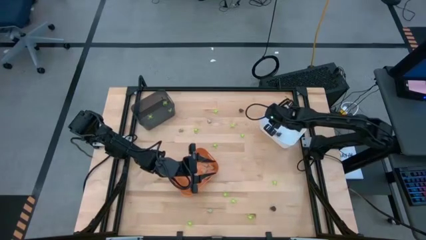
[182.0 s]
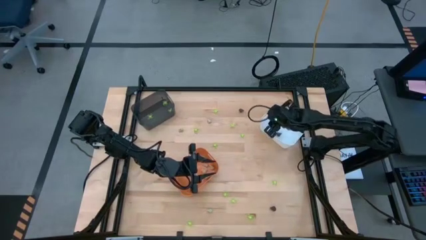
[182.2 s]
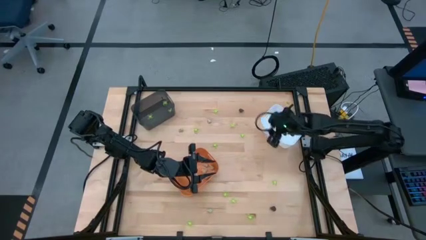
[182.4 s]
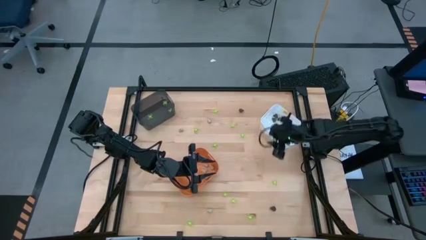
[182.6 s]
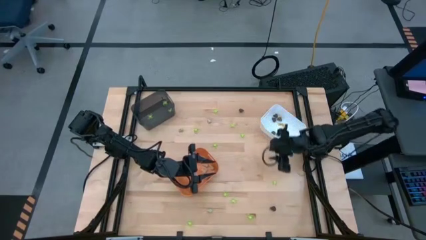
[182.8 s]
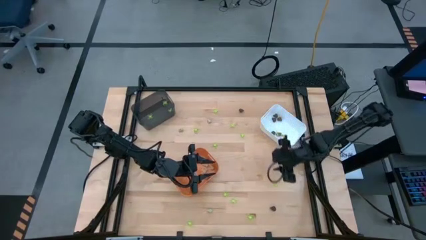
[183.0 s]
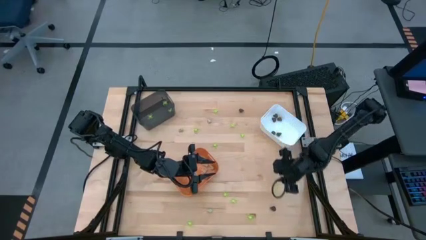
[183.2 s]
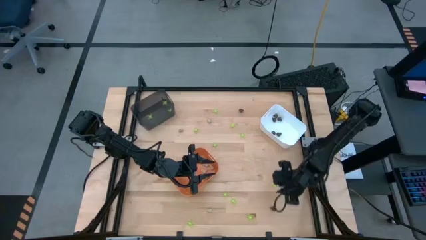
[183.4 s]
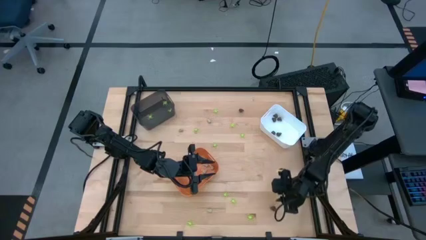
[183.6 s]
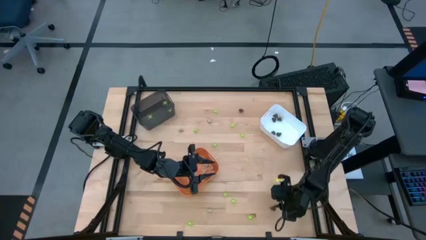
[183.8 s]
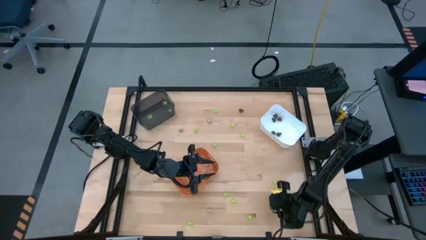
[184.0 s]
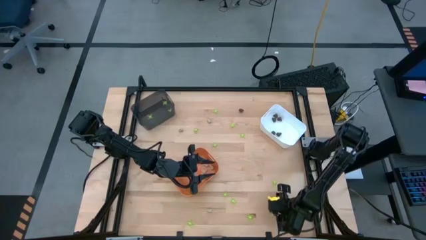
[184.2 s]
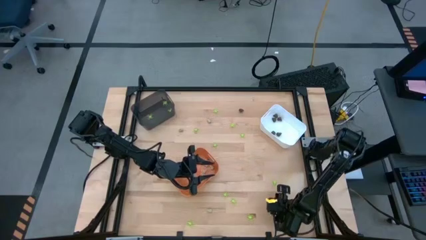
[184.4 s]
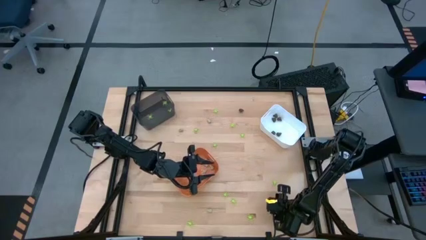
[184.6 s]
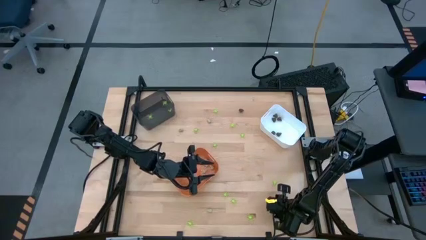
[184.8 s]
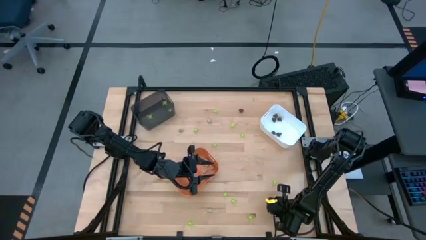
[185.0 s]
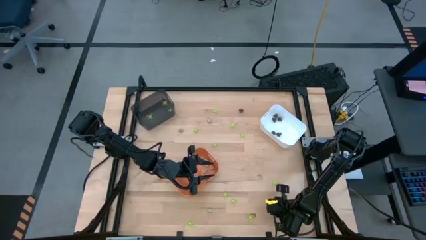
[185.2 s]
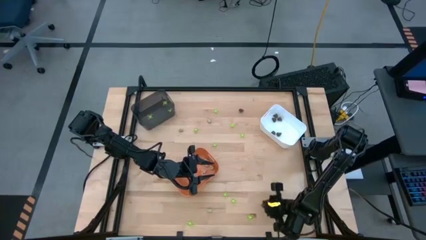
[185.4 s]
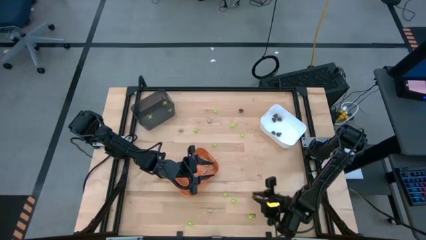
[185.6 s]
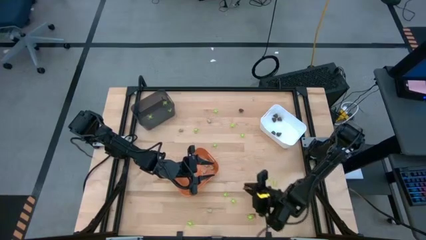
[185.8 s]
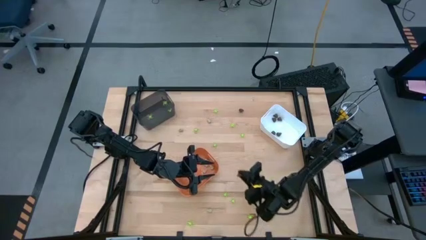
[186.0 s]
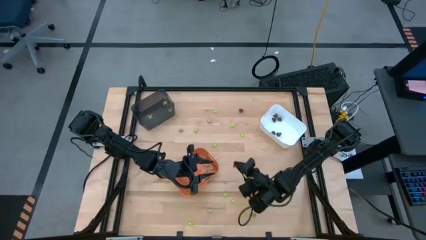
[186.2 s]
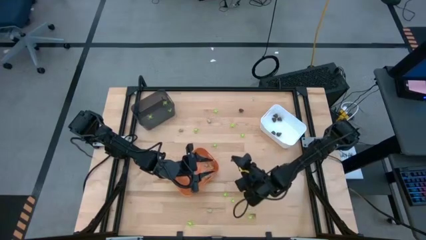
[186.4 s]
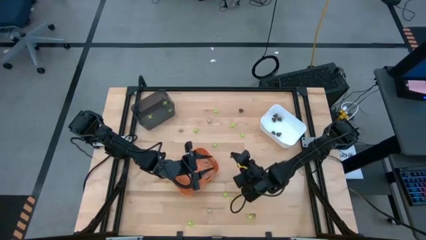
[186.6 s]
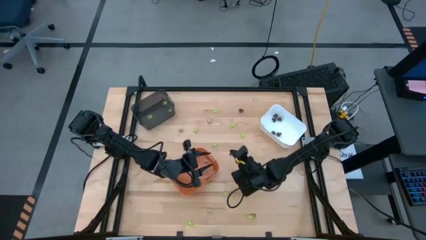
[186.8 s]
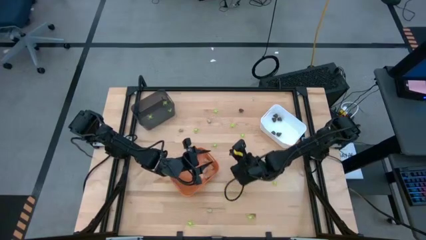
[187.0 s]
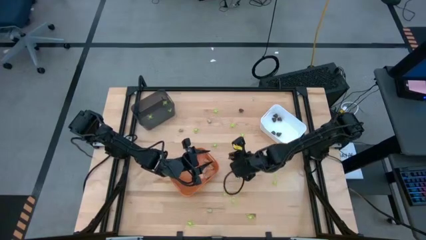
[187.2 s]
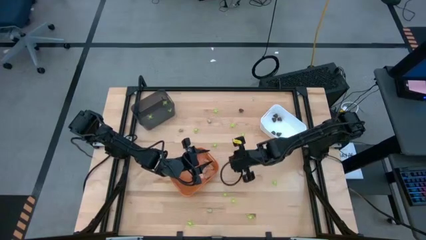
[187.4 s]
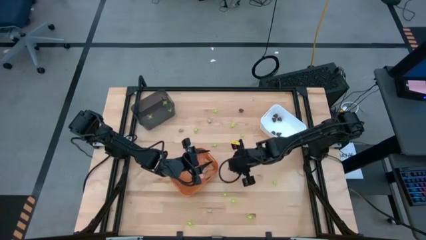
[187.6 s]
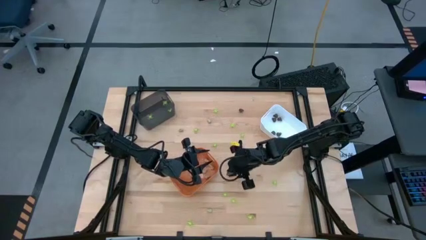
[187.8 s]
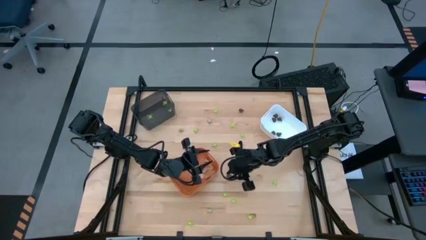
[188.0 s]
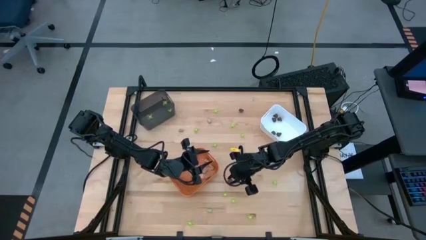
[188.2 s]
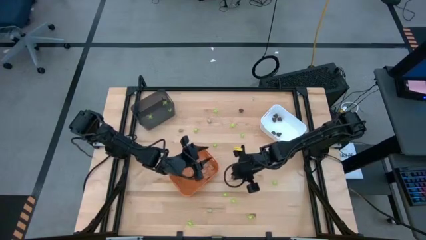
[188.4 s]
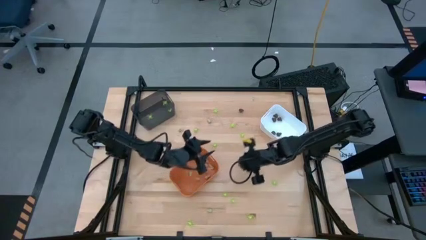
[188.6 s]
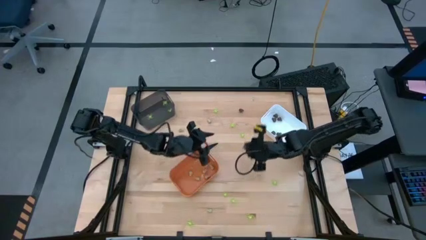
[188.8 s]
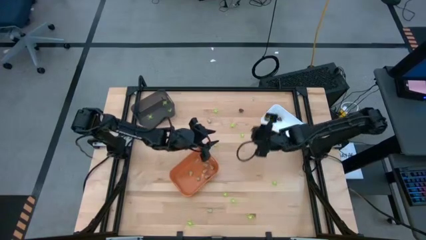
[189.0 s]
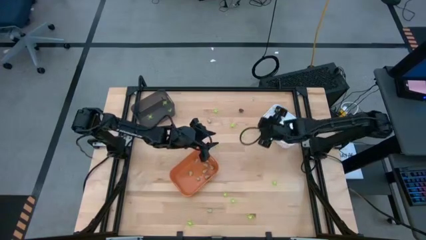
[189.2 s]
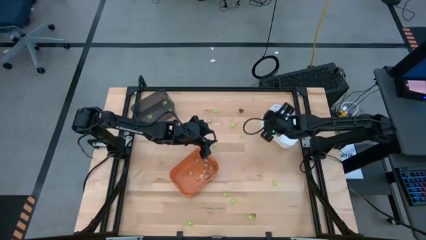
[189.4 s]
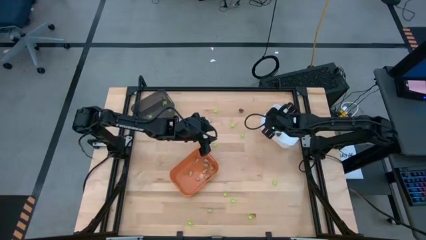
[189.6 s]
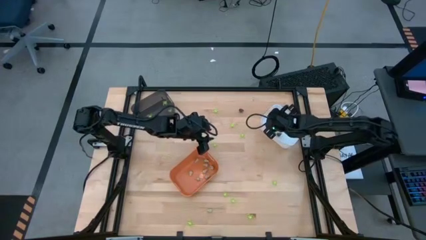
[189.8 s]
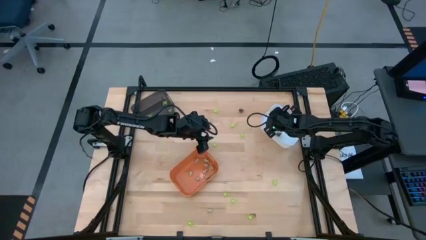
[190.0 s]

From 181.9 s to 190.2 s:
Task: Sort Halloween decoration
Put the small transparent skull toy into the white bin

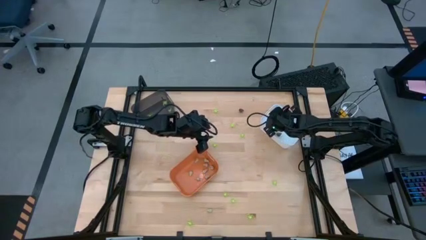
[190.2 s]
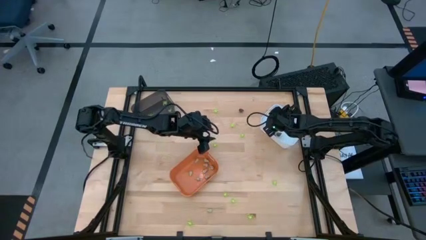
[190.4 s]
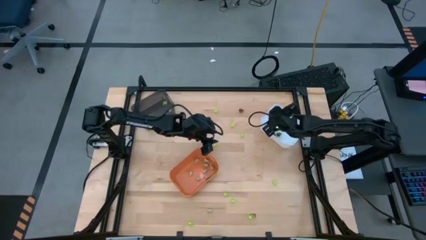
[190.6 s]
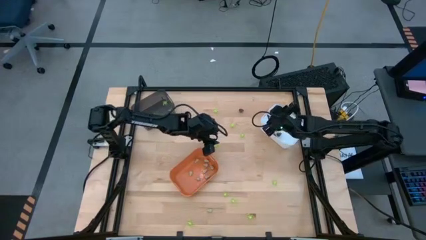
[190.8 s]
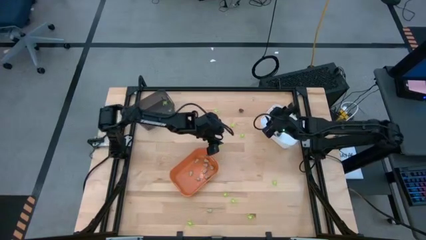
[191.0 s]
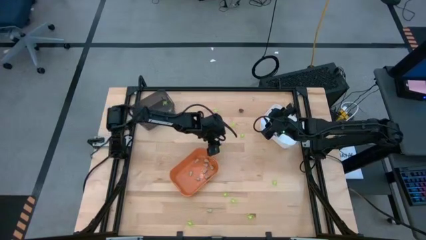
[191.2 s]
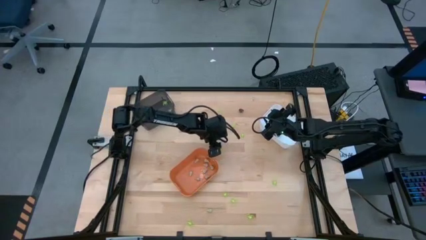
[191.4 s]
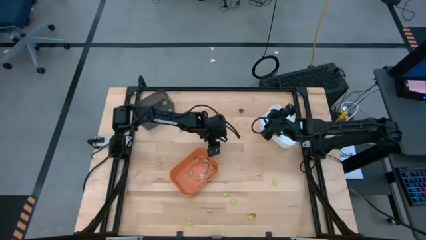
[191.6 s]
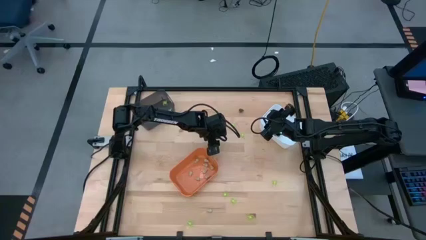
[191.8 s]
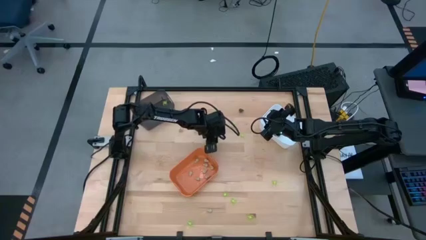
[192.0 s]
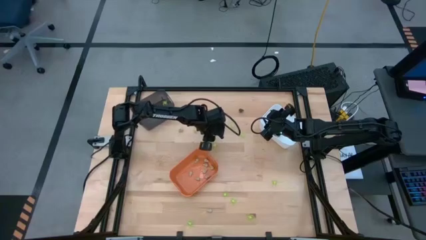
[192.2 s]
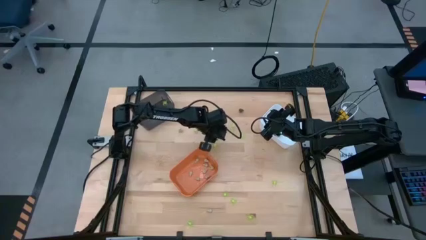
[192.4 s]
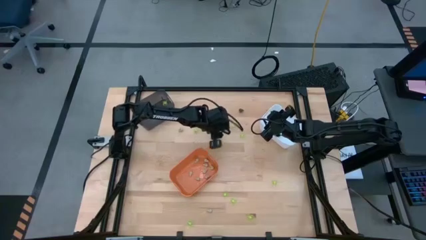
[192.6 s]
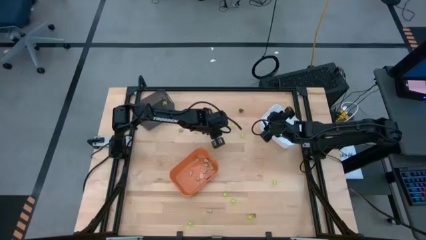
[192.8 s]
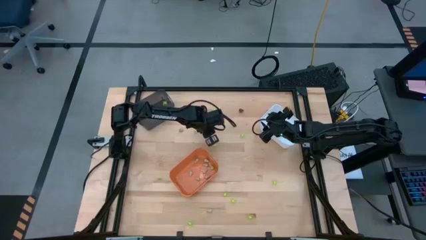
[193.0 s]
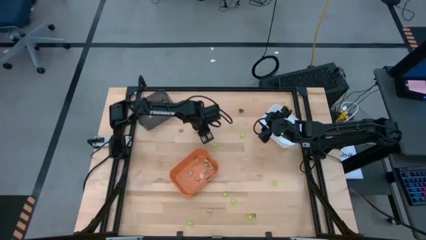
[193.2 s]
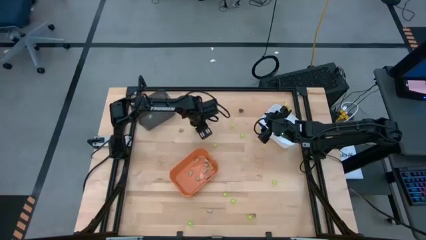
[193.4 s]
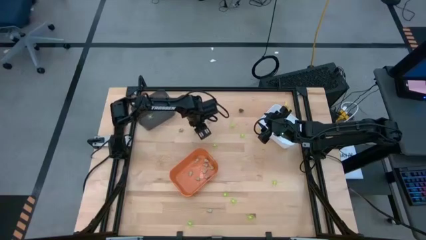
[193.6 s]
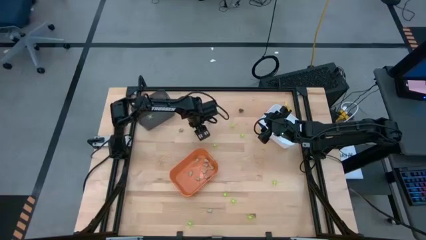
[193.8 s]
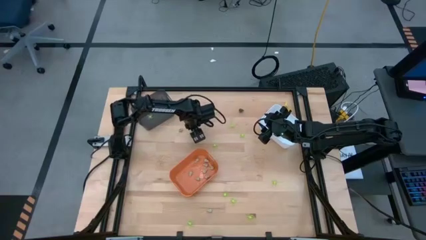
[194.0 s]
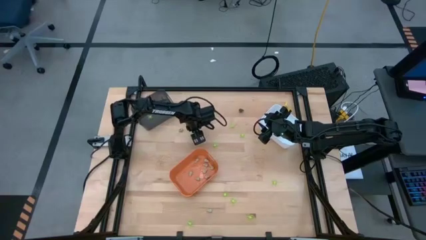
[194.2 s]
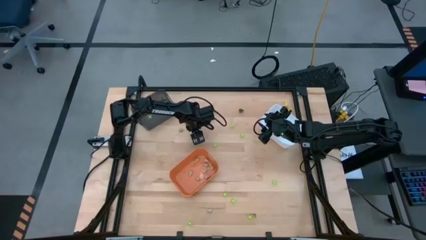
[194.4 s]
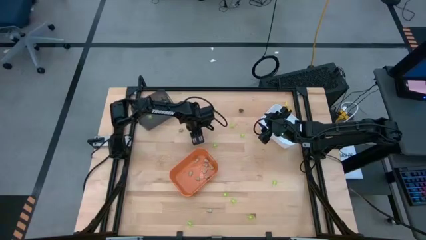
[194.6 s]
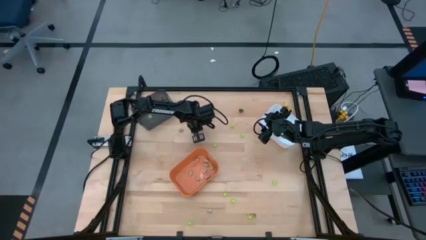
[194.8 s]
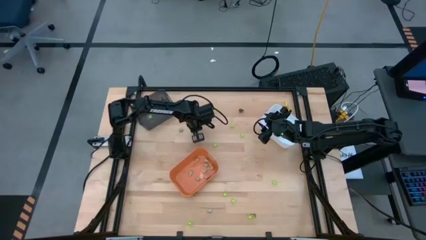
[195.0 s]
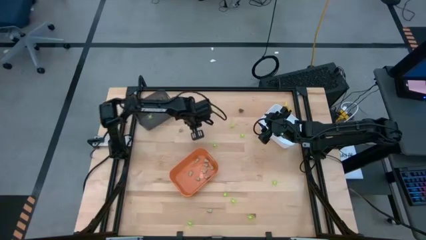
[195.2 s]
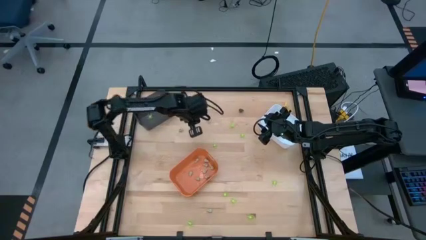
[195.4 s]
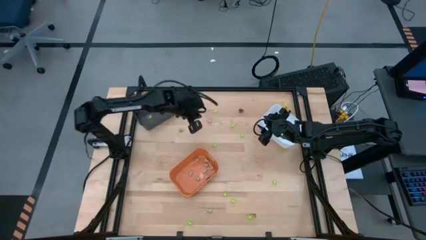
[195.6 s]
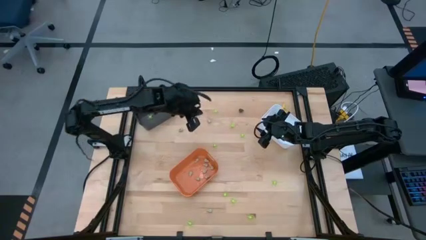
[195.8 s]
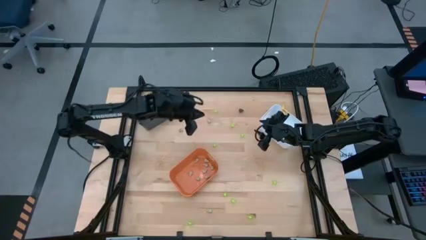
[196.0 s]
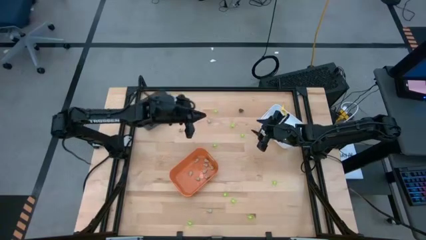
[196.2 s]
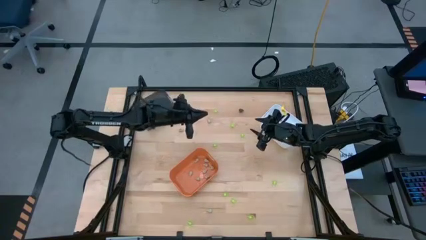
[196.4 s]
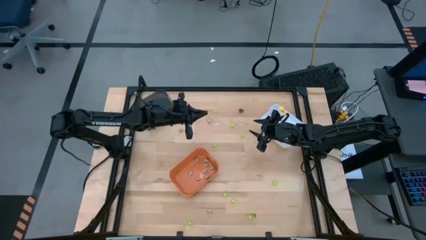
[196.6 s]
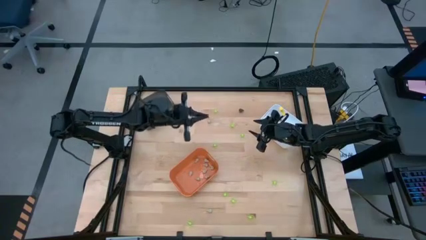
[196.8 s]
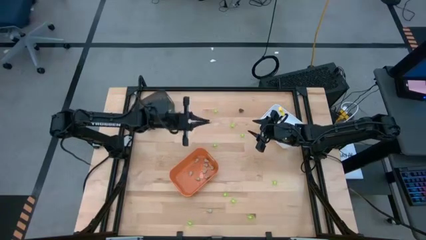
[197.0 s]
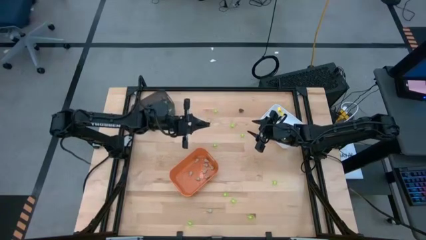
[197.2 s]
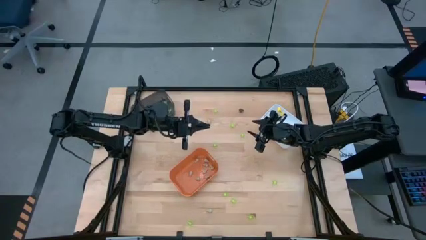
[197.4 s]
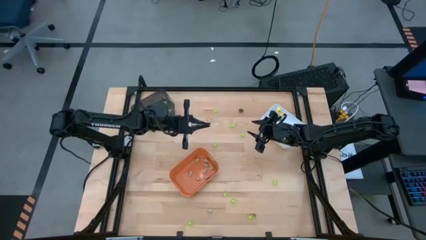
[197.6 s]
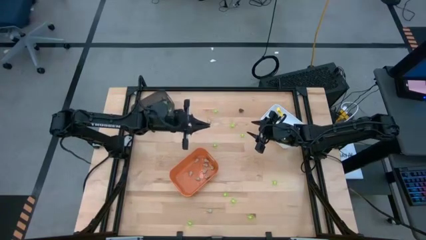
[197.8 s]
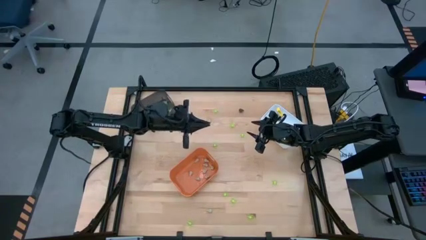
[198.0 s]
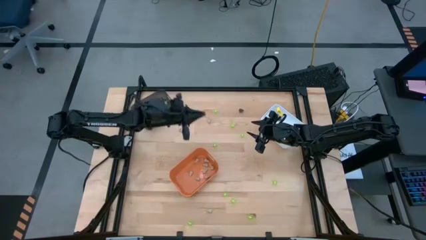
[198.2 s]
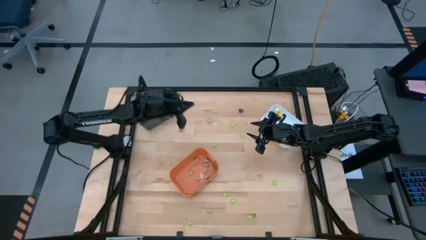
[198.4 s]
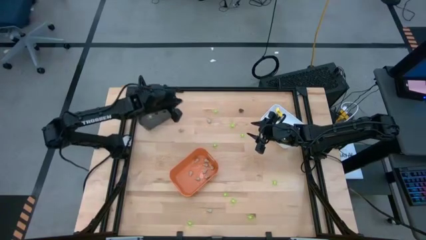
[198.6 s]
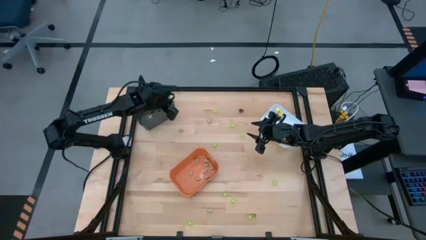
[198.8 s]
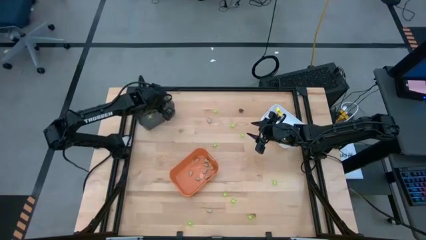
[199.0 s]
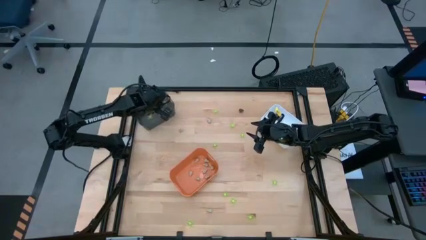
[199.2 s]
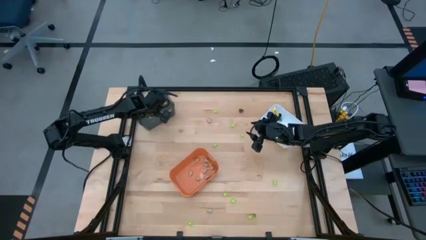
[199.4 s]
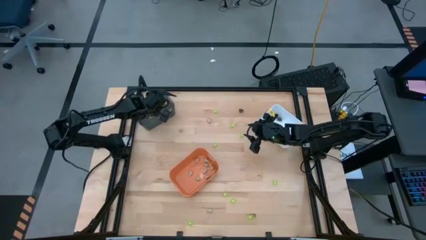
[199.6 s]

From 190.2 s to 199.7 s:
Put the green spider into the black bin
